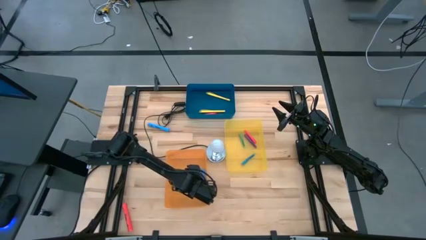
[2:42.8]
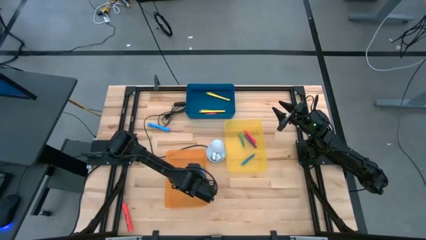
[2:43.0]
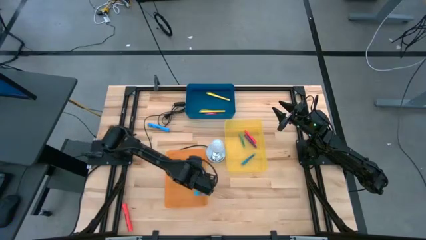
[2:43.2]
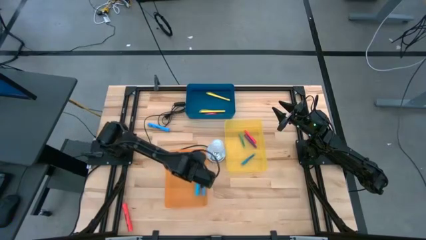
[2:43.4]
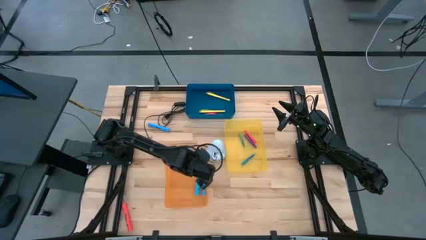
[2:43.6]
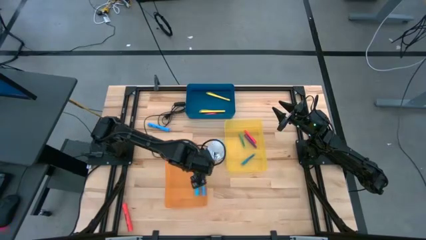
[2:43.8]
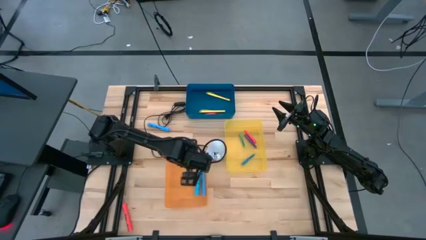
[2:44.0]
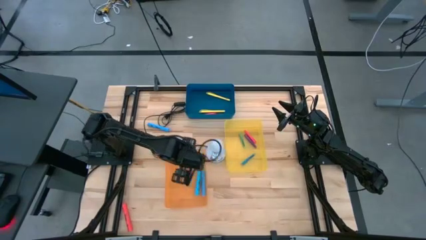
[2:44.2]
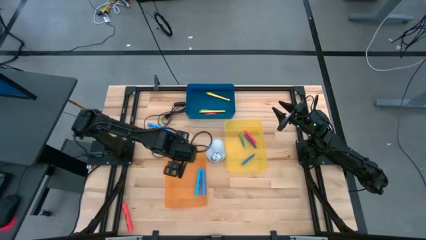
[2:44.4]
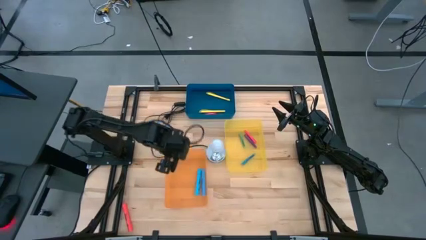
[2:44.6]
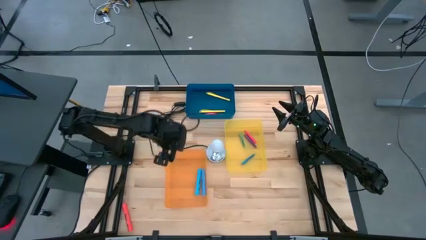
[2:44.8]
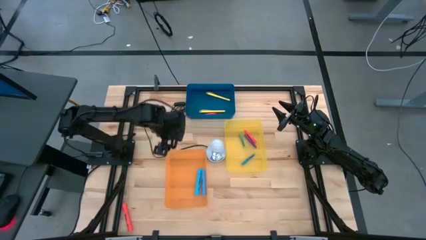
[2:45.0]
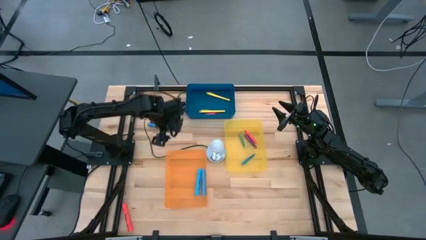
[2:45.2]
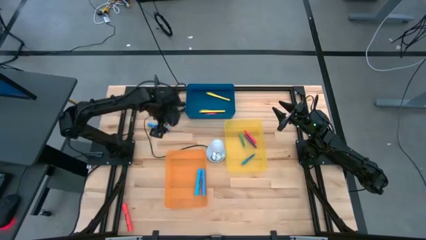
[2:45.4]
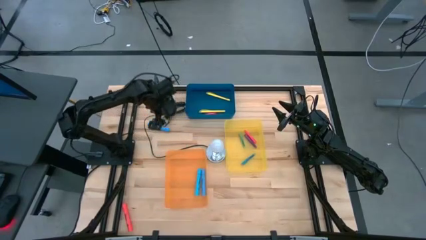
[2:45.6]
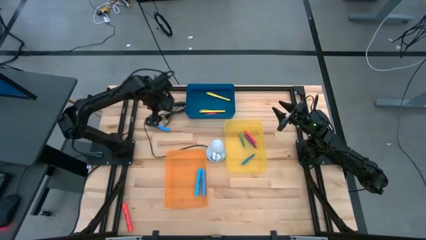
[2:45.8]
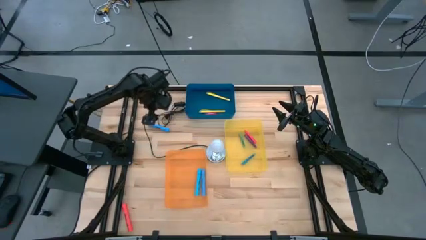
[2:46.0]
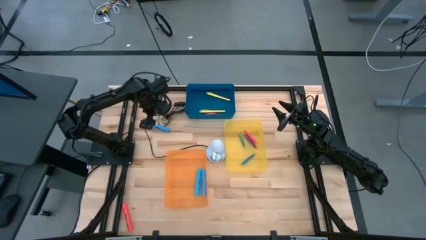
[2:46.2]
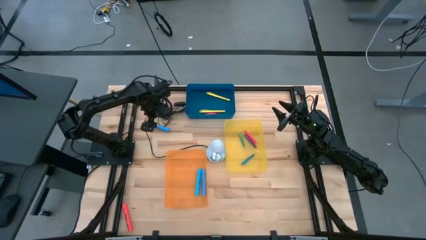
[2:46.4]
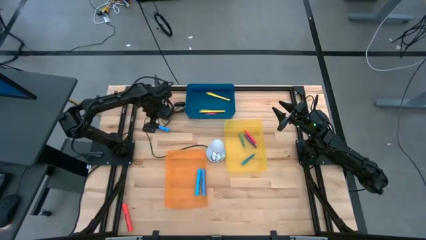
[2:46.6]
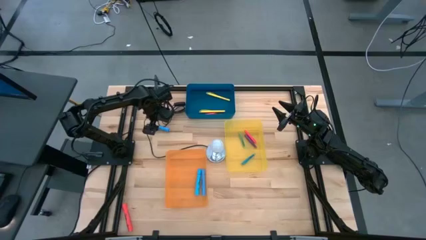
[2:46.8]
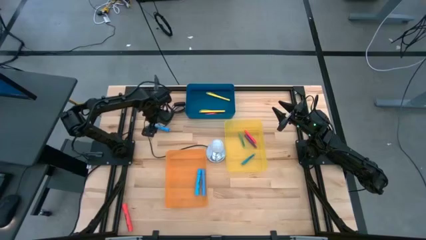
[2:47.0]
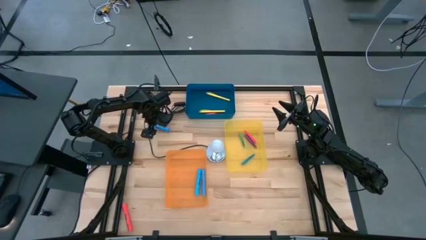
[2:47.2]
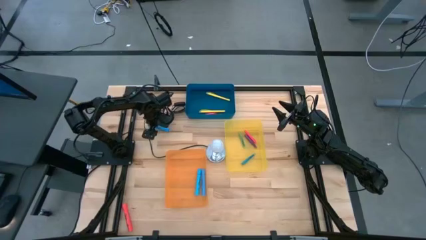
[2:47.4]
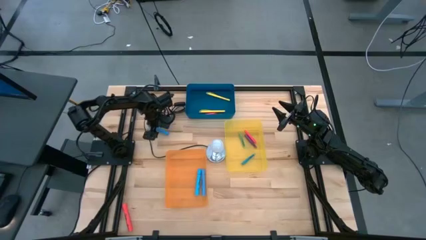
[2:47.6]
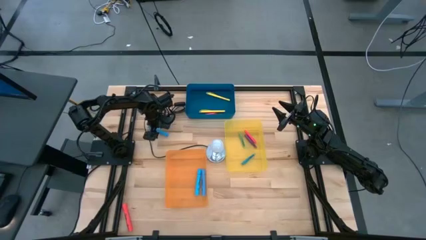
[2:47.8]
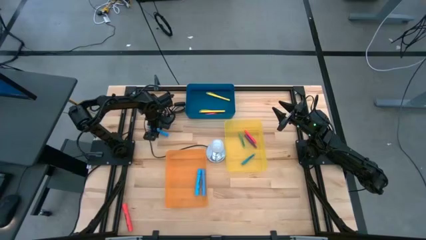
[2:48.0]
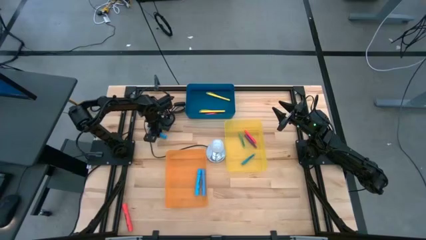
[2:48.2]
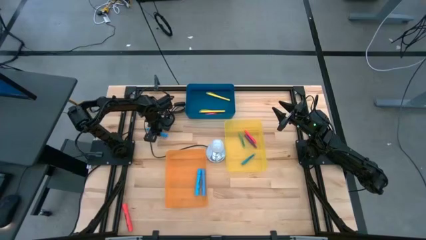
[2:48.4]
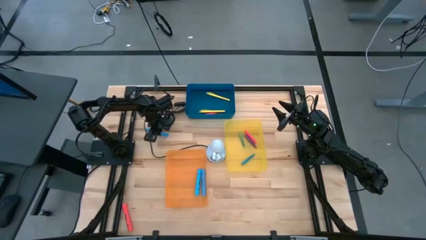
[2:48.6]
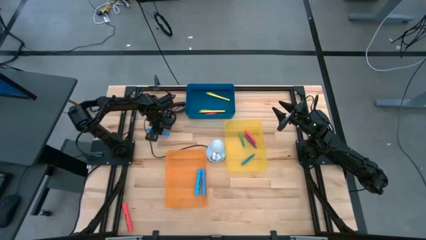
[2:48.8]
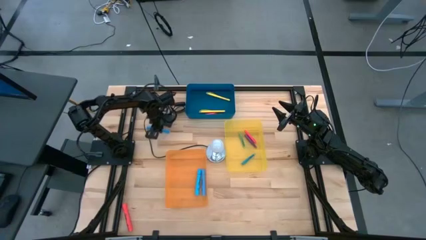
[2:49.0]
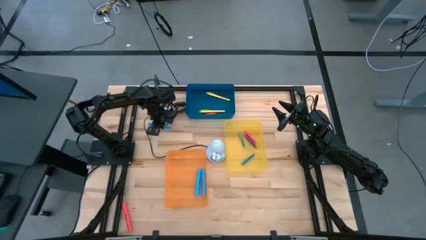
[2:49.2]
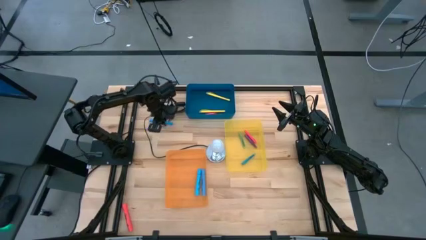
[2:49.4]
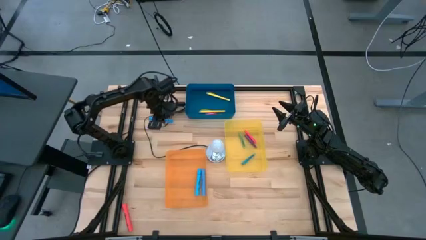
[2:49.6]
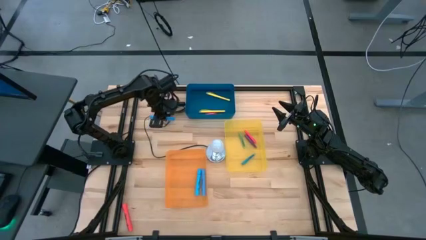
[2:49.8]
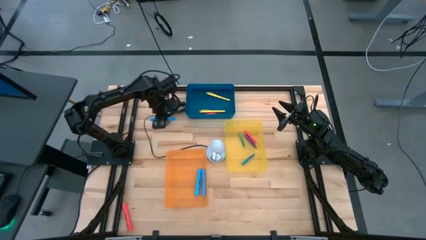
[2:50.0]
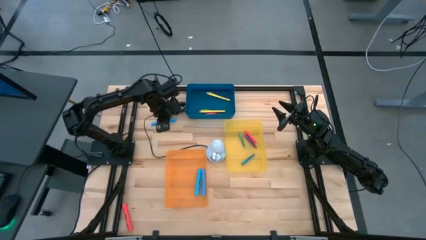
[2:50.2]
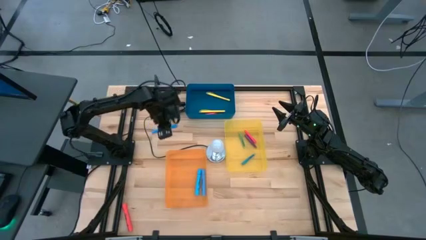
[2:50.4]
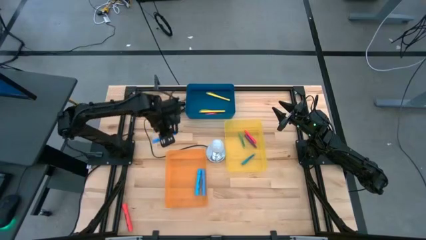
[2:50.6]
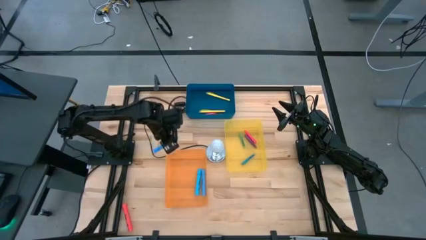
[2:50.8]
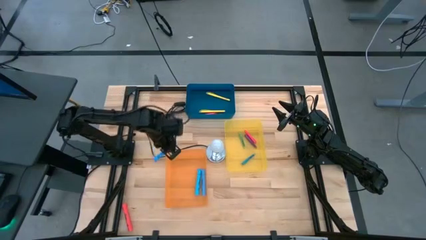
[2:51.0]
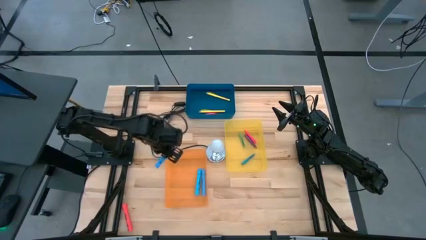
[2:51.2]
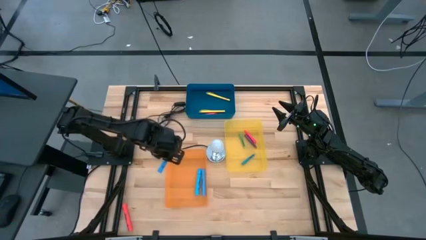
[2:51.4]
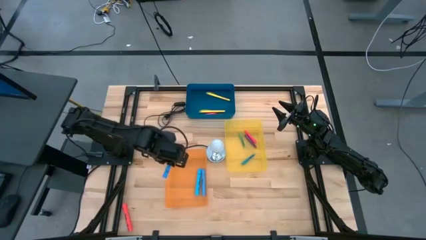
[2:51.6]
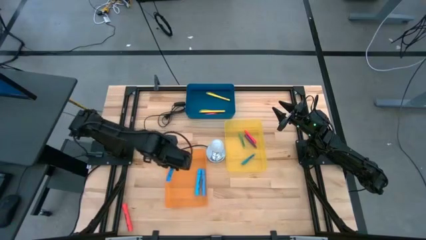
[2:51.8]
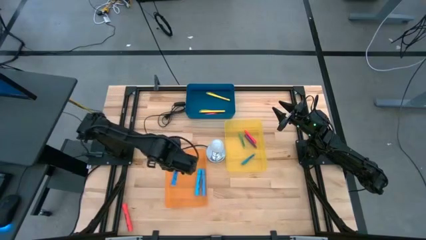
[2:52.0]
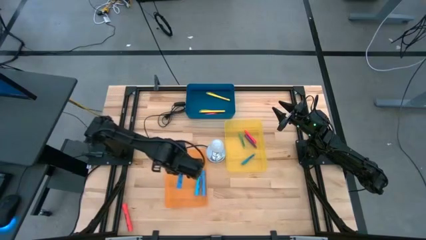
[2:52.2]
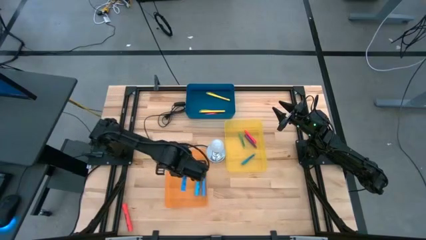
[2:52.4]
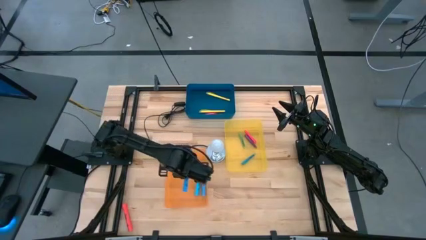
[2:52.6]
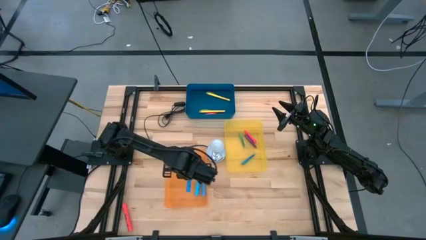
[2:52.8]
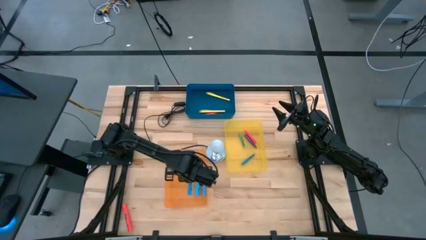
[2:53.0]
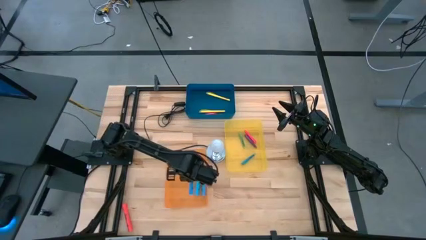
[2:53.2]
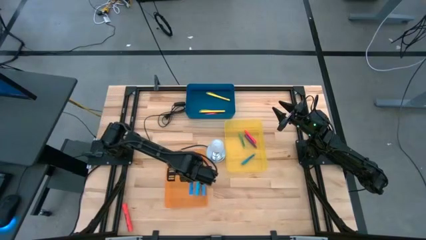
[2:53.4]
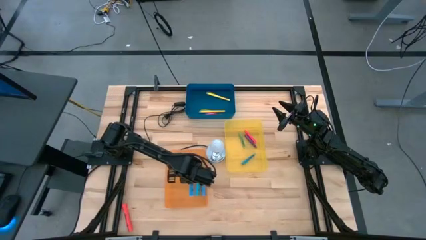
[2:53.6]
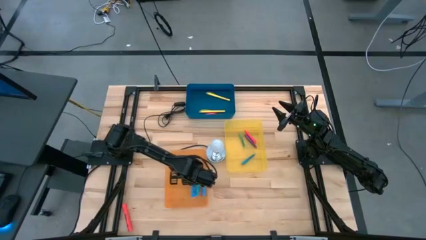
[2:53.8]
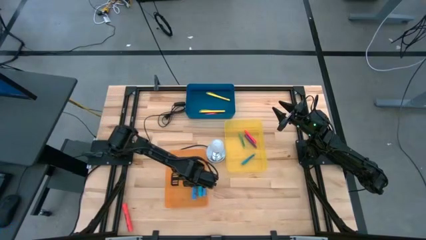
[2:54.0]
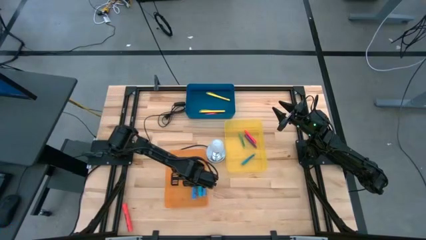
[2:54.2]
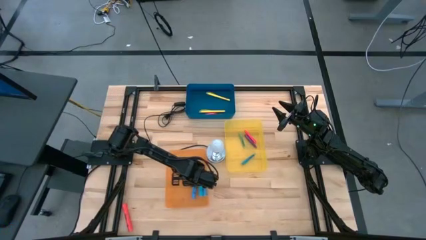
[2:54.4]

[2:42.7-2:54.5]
Task: Pick & Place Markers
Put the blue highlighter pen into the orange bin
